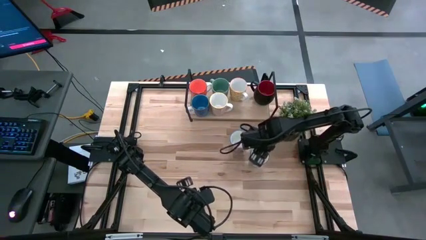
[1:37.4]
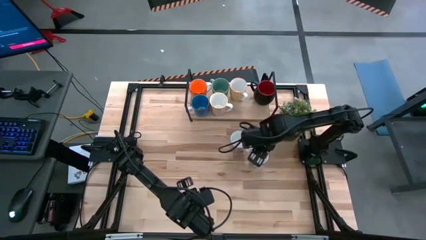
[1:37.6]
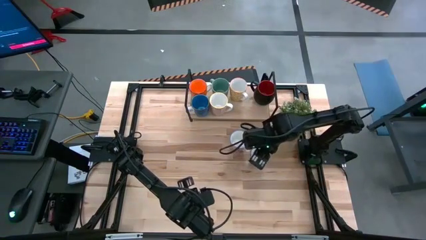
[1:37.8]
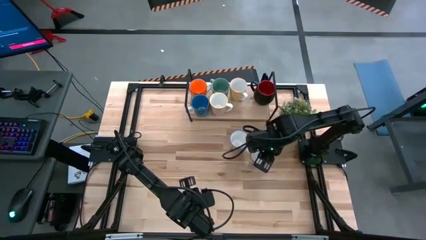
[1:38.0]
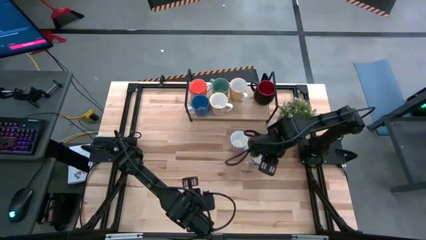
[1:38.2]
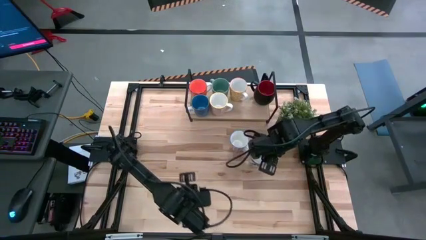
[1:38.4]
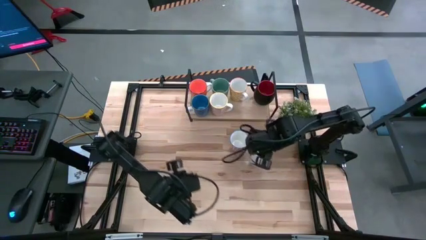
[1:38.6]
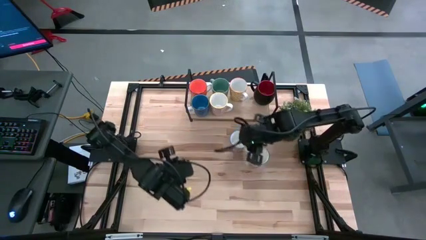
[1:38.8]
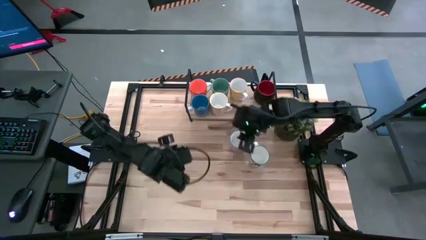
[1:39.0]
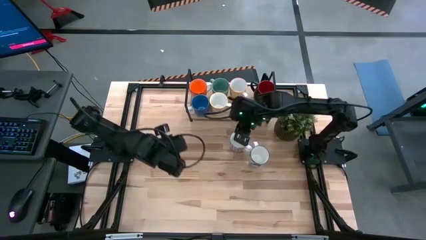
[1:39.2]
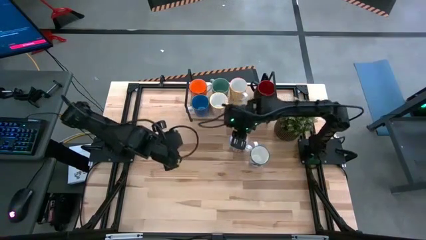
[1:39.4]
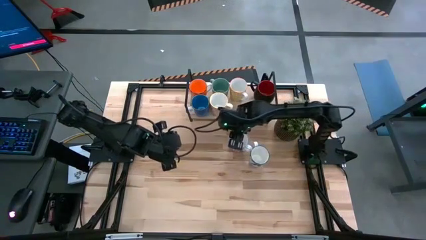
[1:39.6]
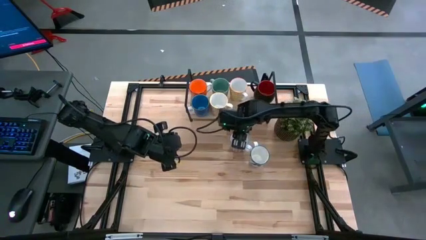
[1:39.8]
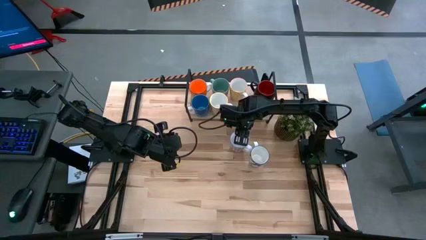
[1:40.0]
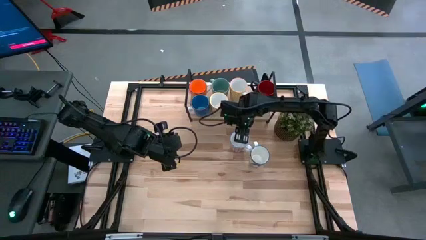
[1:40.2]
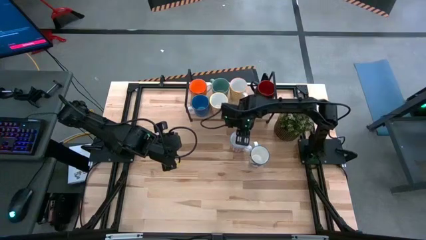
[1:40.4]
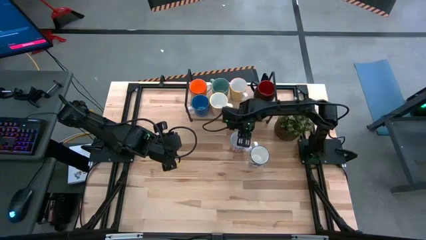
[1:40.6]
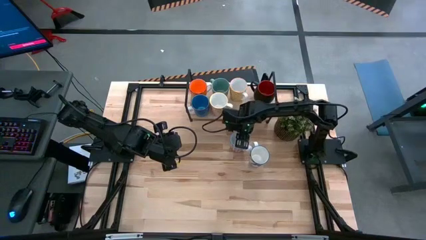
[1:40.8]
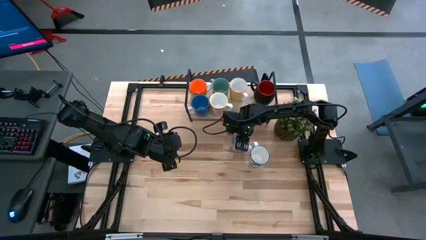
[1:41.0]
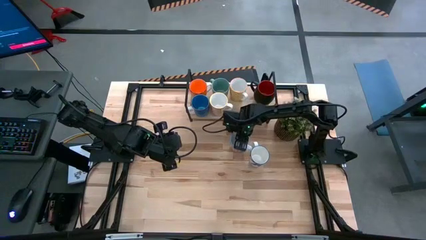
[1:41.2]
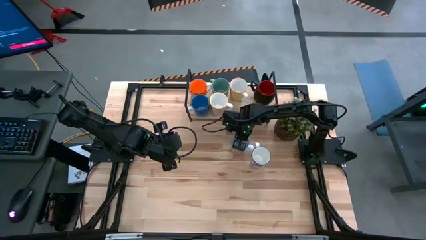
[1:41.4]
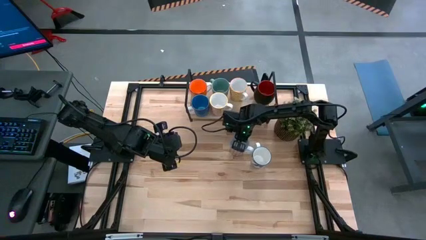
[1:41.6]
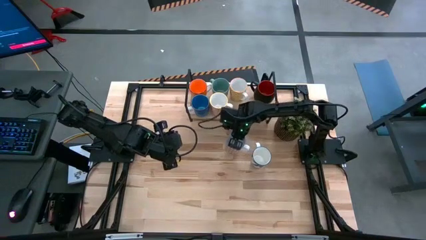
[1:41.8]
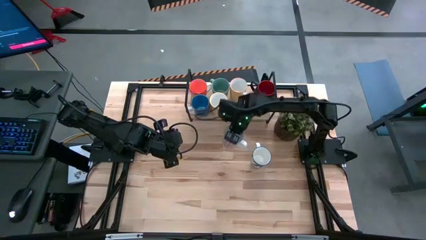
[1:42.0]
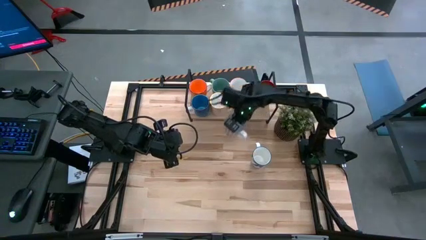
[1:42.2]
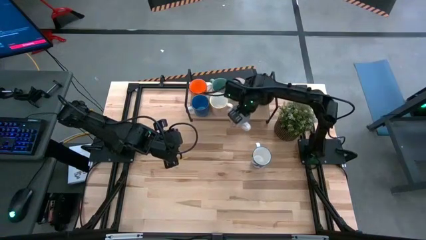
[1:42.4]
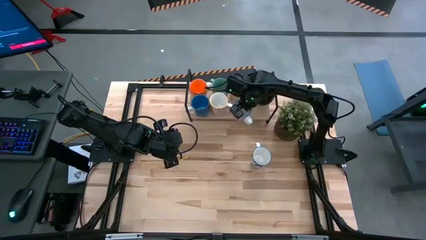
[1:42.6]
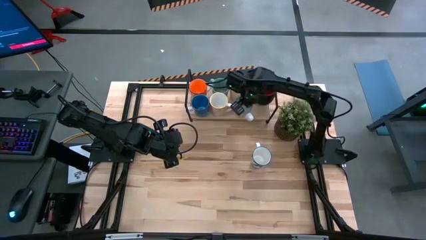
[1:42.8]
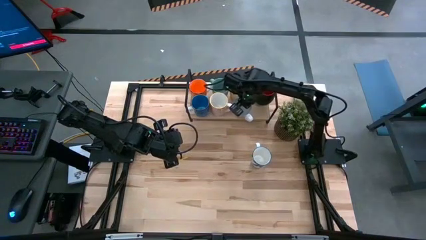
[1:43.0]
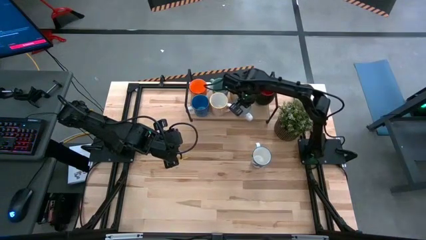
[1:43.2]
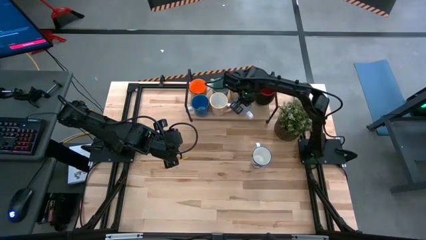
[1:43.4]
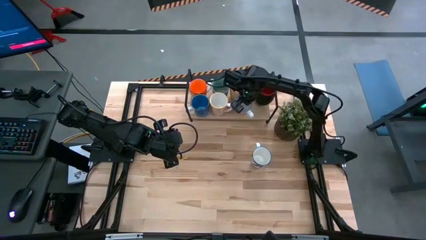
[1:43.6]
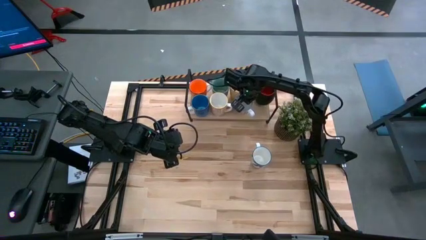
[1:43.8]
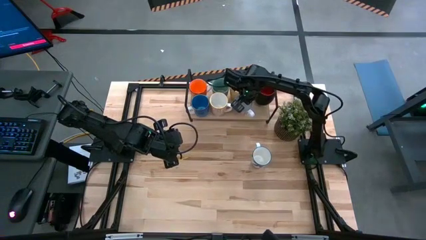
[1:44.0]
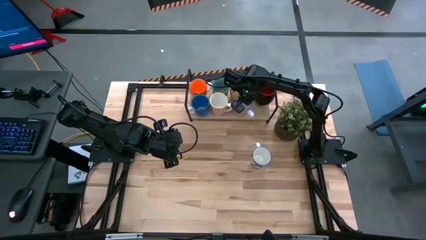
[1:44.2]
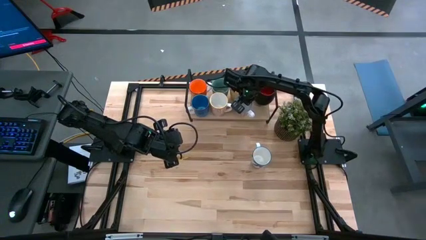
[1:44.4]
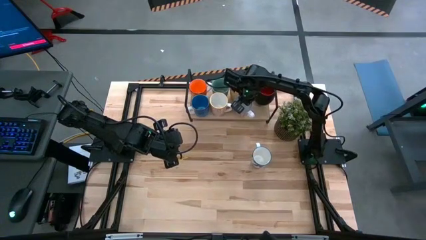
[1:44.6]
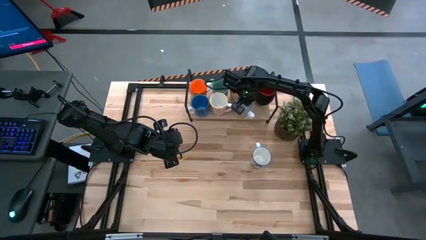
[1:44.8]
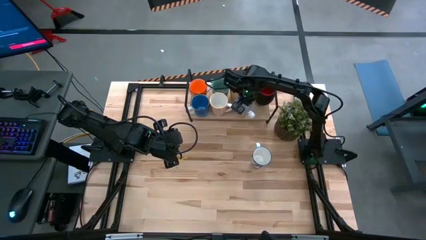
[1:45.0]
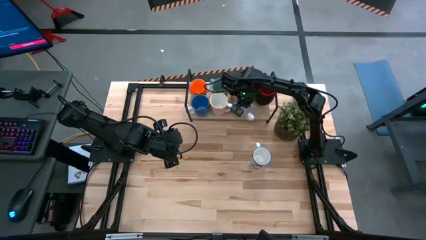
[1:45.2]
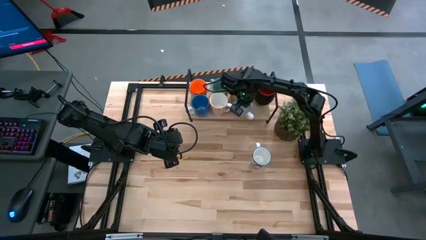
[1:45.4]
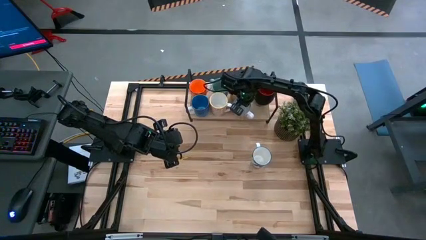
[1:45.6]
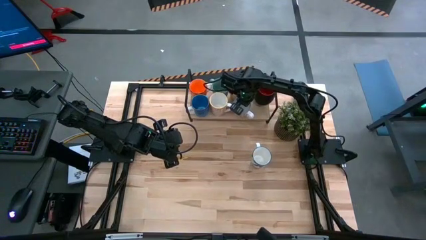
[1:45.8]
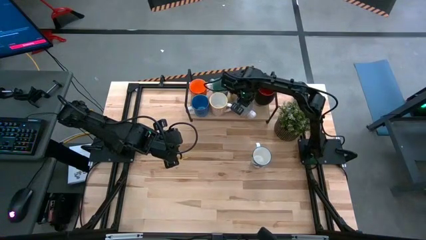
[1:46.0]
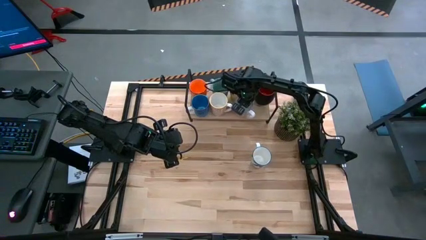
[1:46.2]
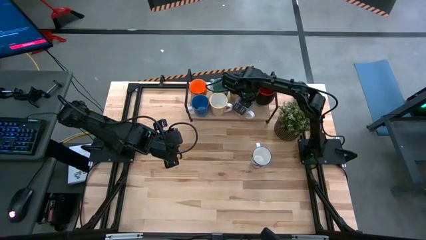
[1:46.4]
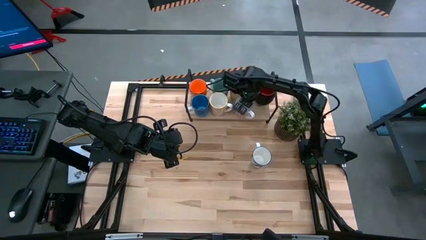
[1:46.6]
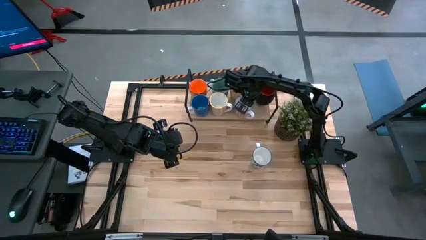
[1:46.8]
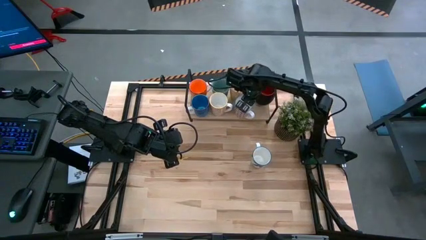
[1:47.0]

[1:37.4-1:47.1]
Task: Place coffee mugs
Put the red patterned mug on the shelf
